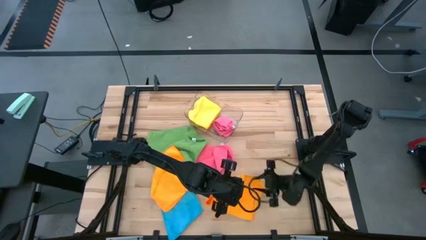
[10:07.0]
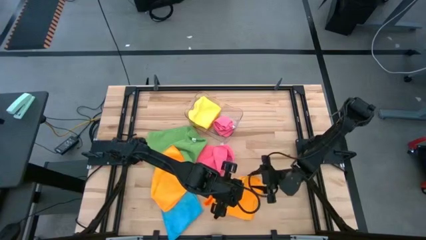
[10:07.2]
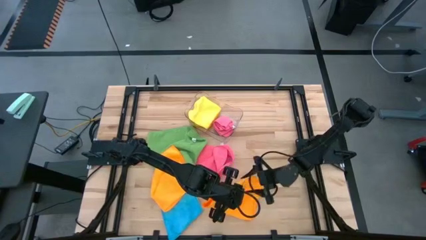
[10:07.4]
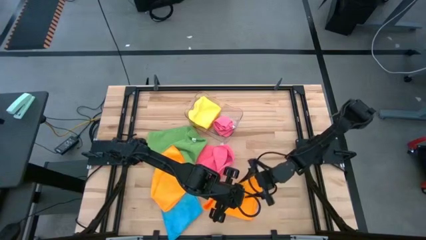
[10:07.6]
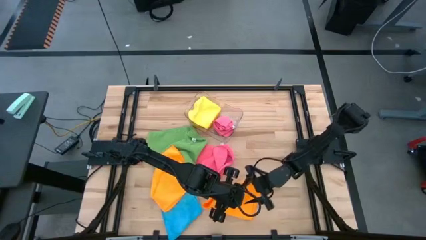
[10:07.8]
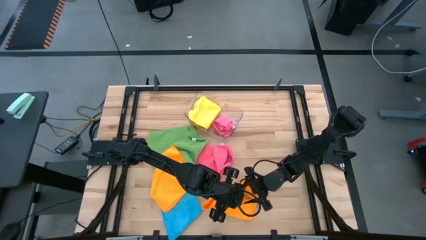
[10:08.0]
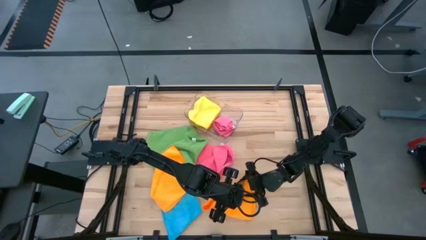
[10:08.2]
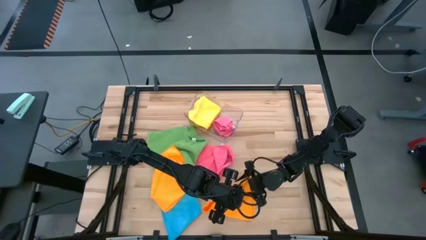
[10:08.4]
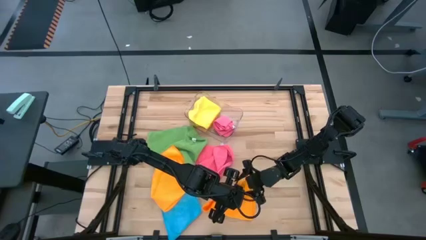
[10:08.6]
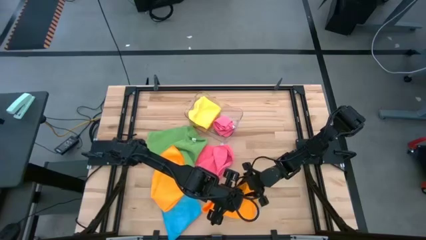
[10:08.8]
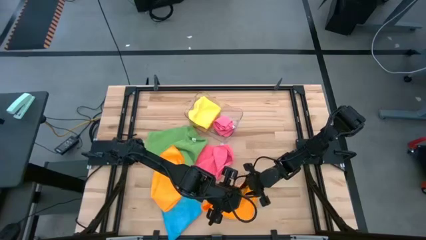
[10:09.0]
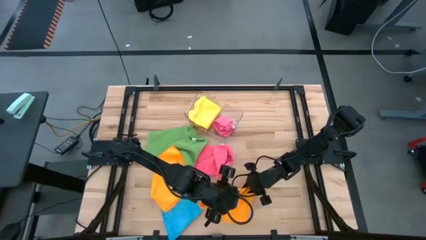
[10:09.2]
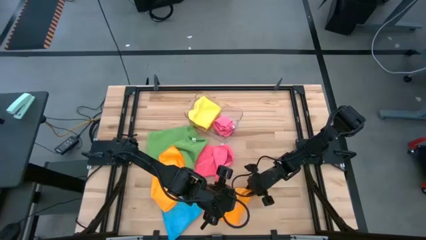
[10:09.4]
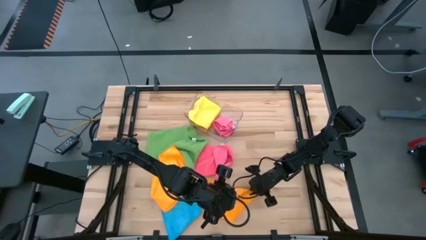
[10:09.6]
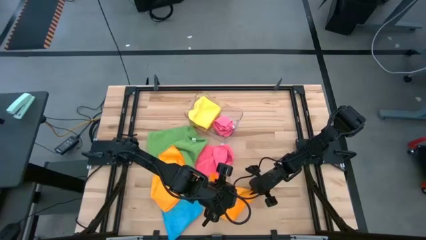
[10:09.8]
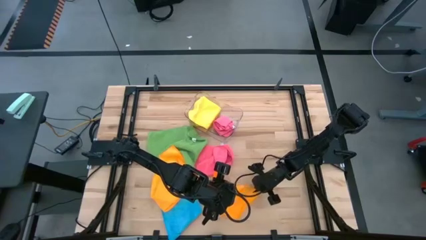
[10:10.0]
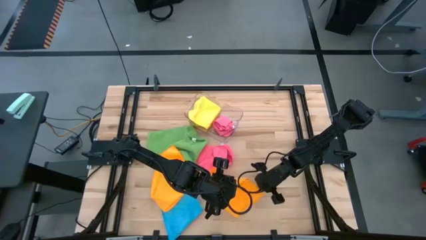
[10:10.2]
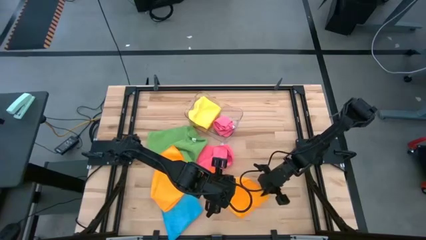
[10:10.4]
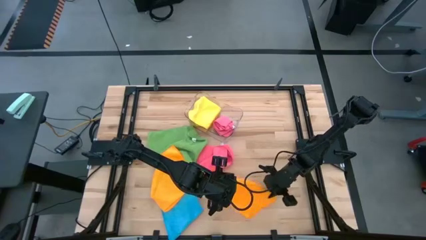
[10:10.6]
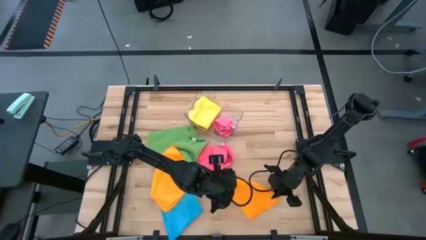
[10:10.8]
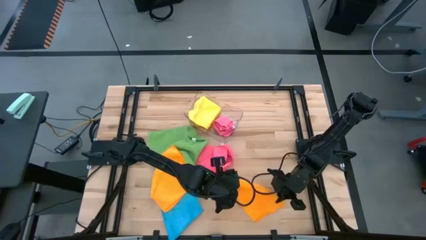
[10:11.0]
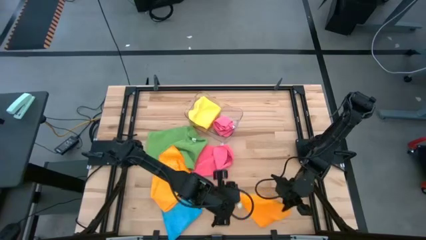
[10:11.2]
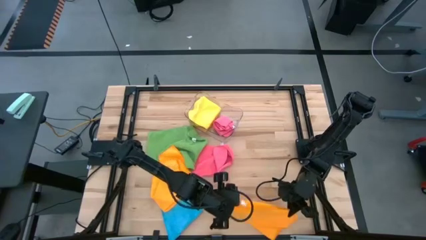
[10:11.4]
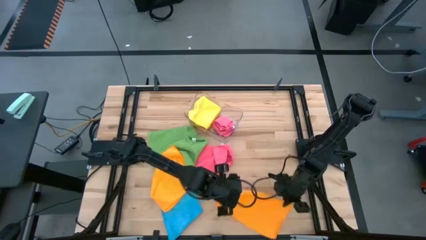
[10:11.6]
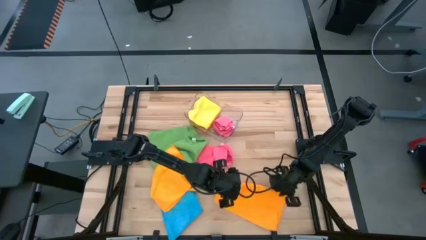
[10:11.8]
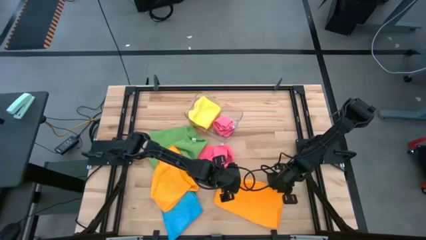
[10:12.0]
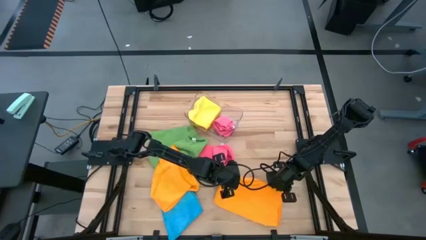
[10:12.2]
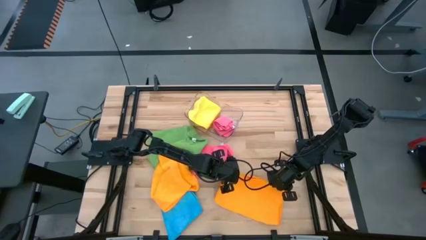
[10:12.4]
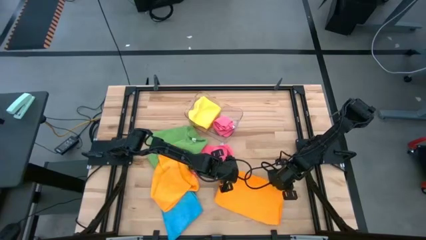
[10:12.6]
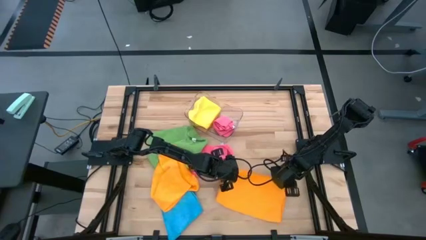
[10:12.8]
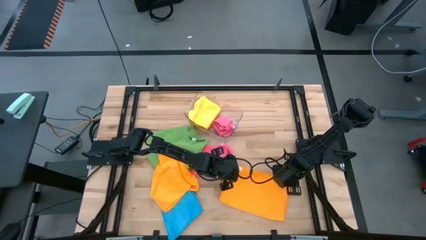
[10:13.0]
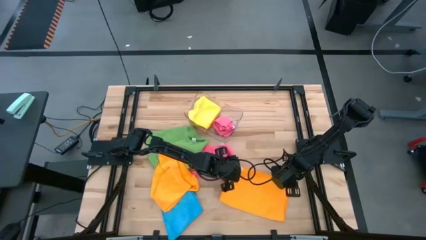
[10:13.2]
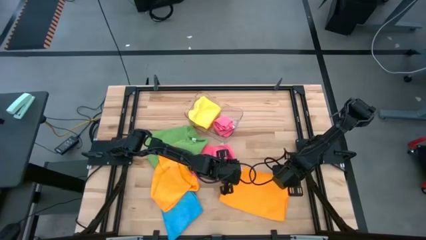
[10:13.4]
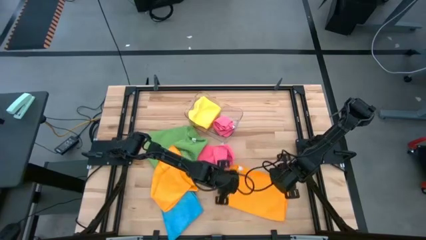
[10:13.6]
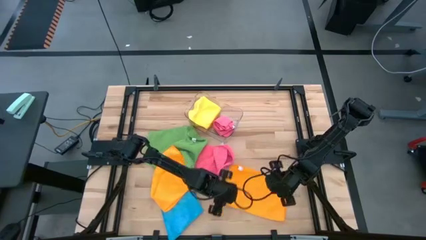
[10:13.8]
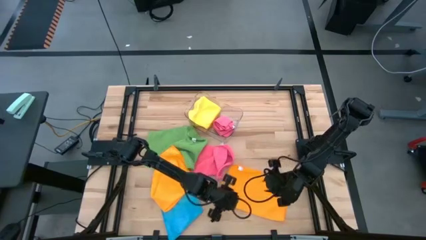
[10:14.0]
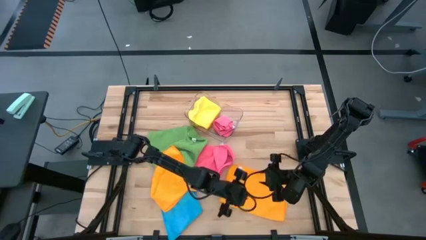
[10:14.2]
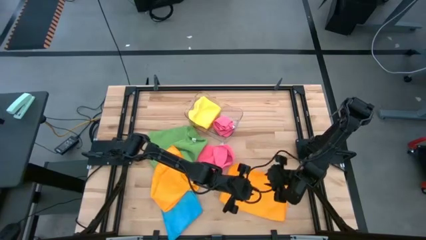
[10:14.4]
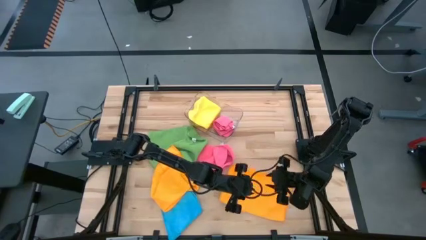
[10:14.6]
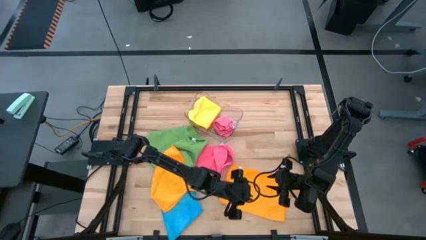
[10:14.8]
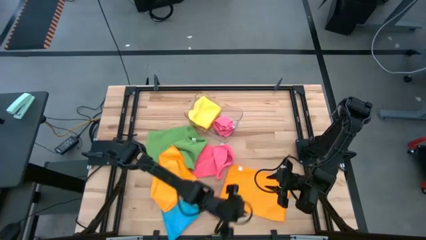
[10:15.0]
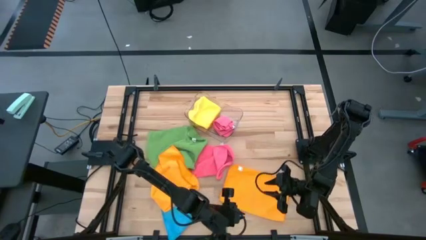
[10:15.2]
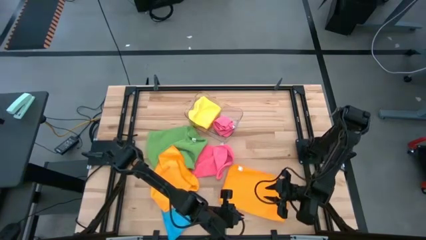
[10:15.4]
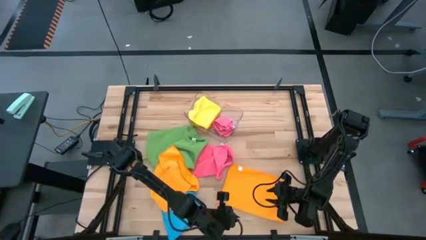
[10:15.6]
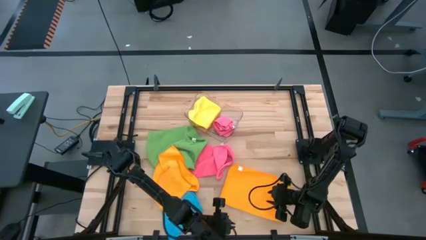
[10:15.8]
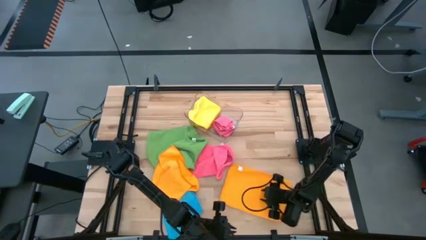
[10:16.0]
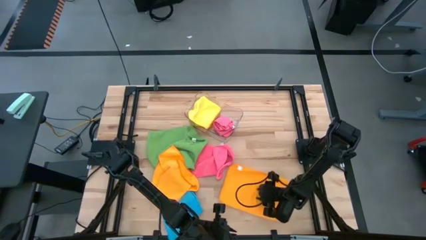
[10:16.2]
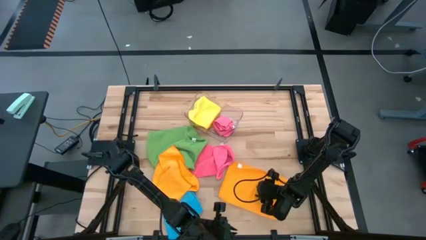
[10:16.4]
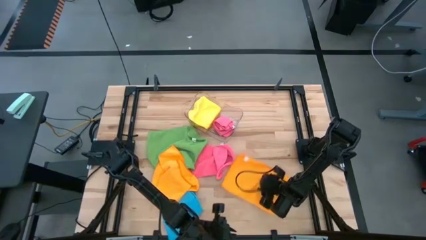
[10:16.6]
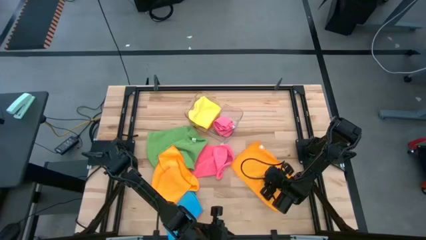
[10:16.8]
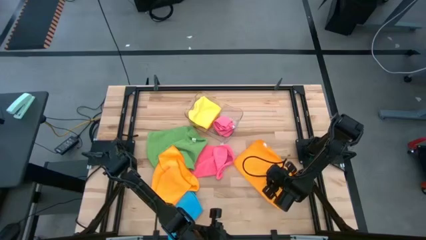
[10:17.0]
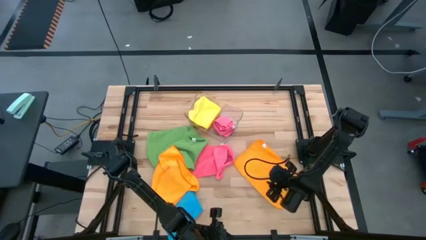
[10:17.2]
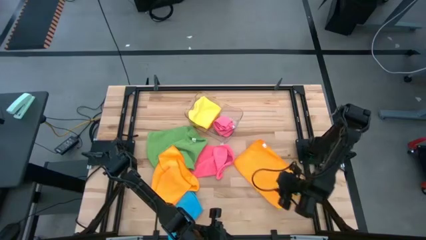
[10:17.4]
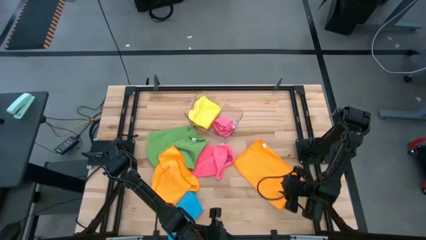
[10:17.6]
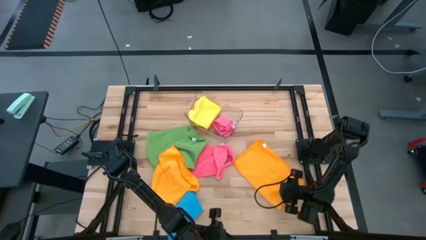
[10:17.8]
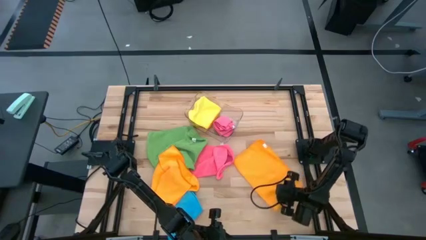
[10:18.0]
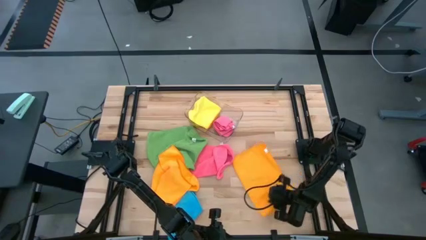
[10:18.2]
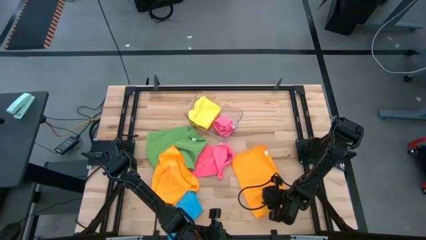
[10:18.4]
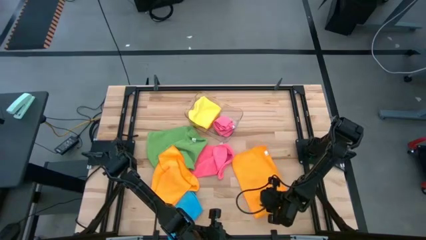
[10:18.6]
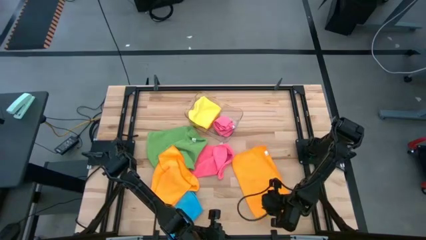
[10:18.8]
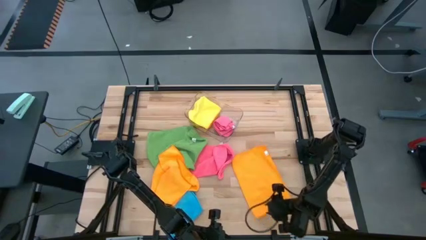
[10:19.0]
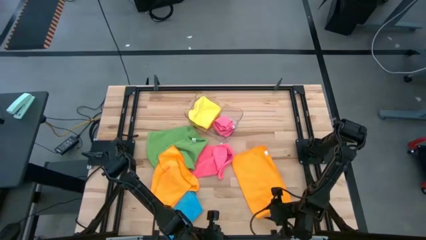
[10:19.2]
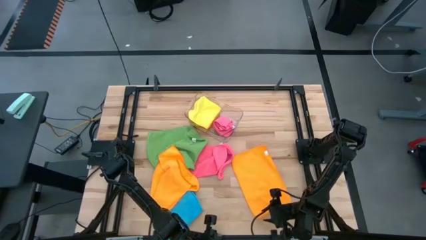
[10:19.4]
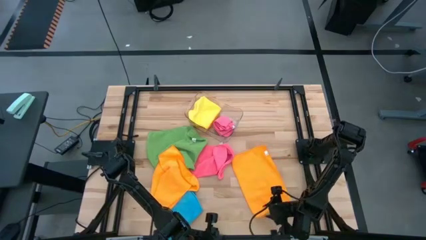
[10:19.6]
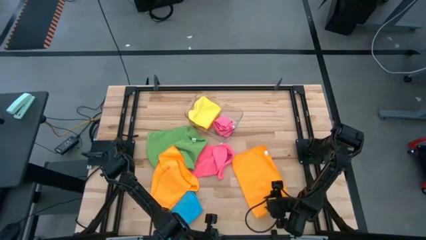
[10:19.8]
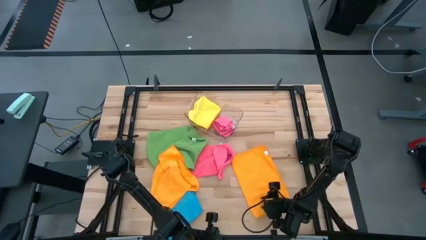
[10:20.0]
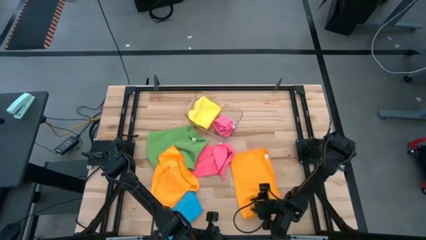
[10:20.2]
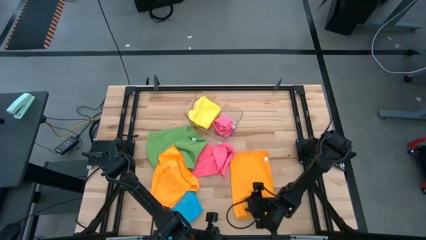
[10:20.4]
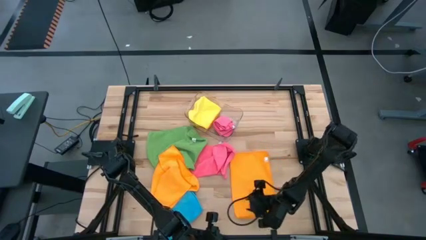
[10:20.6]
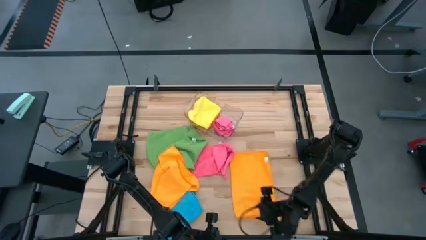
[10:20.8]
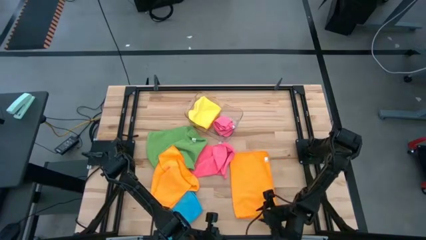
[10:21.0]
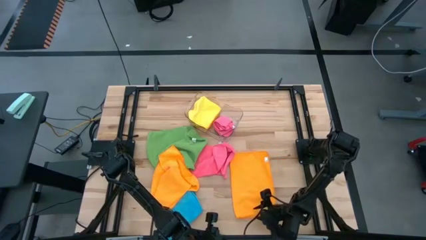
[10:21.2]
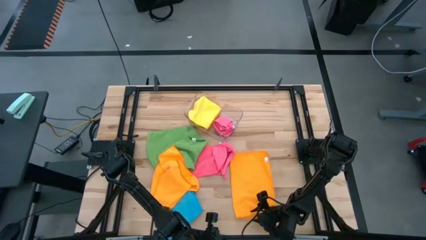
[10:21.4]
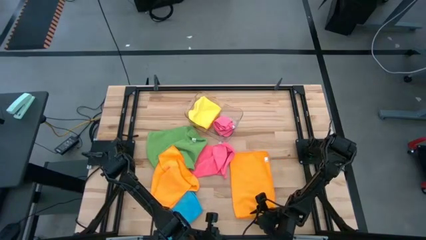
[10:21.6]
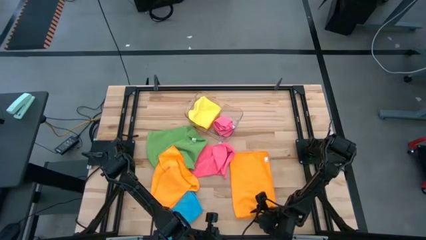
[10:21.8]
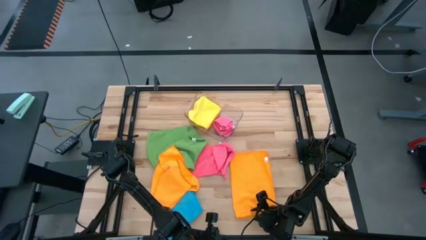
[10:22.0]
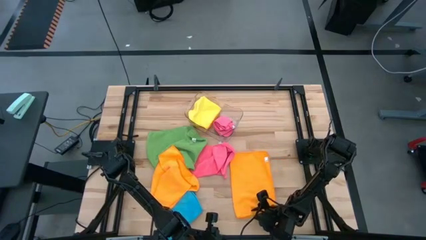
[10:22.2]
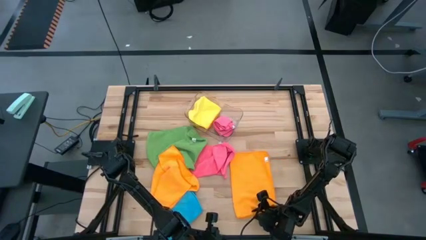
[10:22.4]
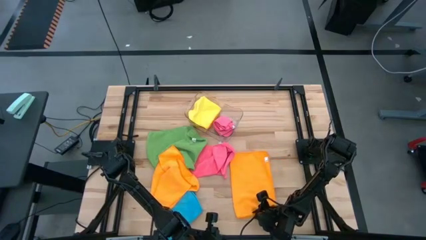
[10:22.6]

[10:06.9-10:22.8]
Task: Fold microfiber towels
Fold the right orange microfiber cloth

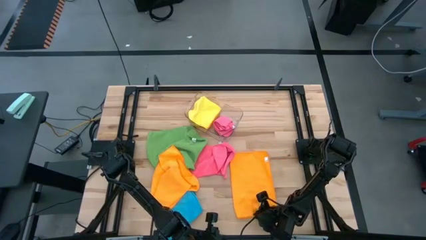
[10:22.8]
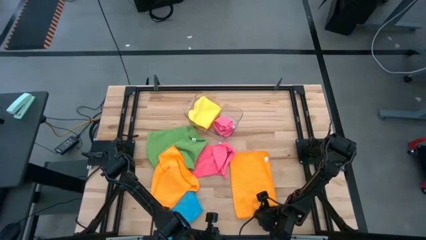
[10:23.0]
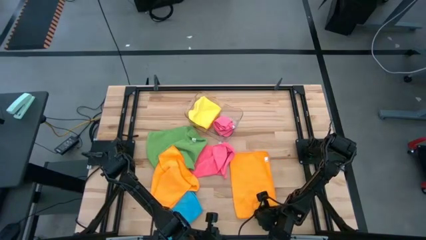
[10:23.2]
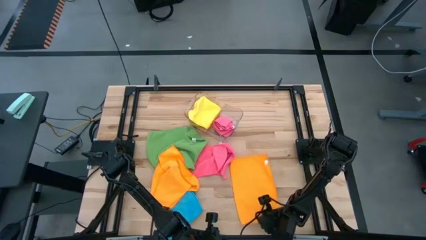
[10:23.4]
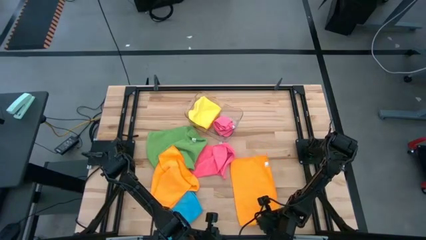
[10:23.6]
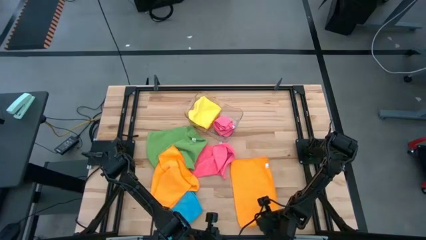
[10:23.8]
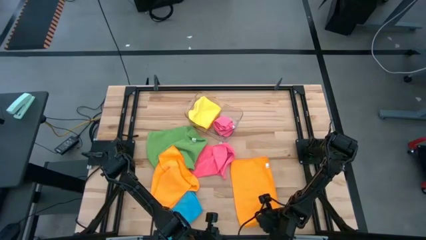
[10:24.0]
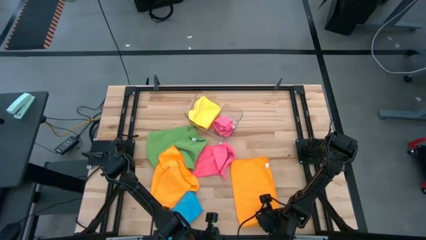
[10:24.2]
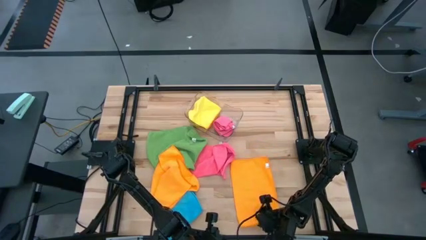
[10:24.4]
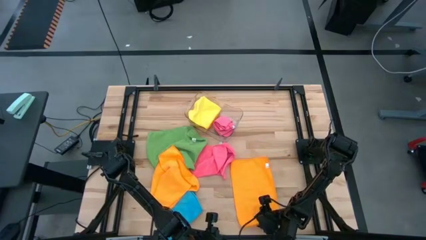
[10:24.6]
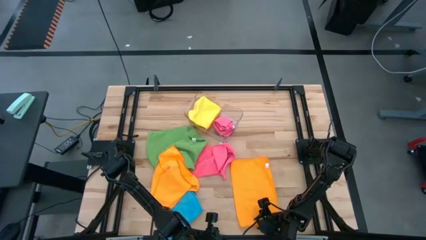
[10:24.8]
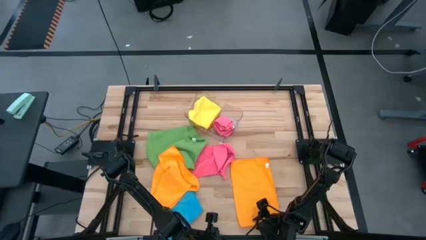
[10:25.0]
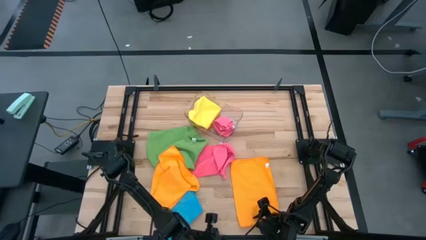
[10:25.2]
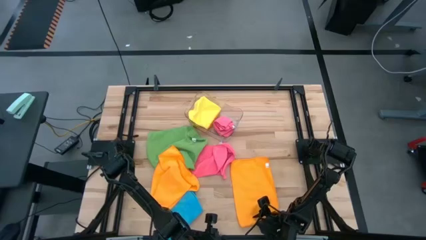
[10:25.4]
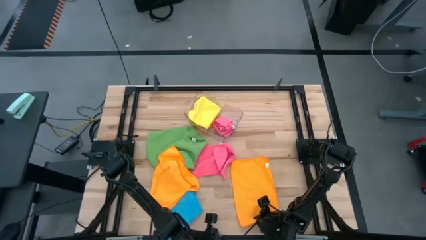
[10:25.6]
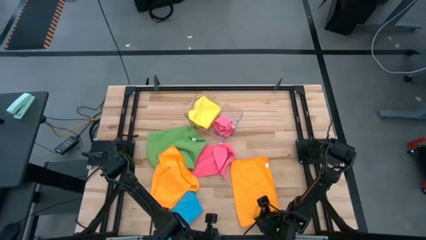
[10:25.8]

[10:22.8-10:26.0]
Fold the right orange microfiber cloth
